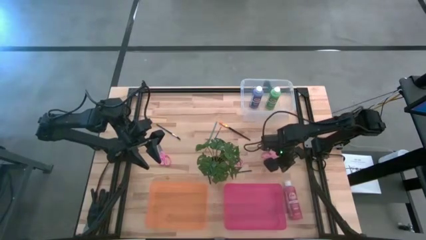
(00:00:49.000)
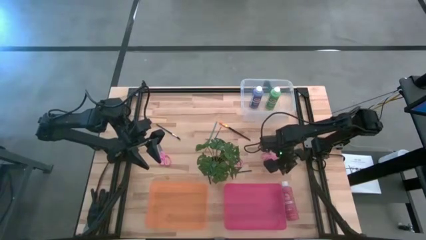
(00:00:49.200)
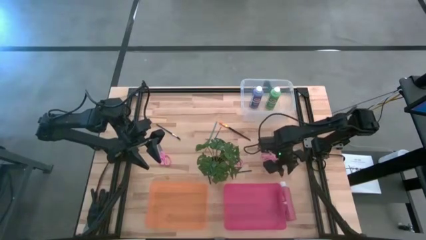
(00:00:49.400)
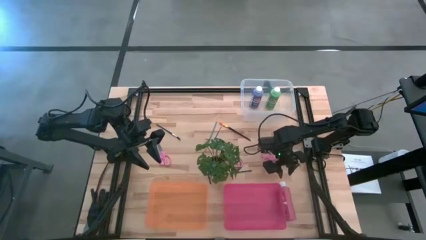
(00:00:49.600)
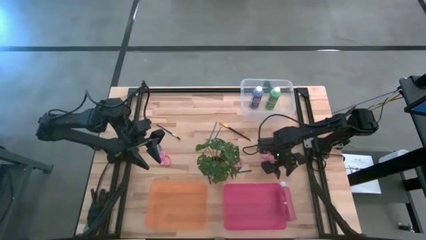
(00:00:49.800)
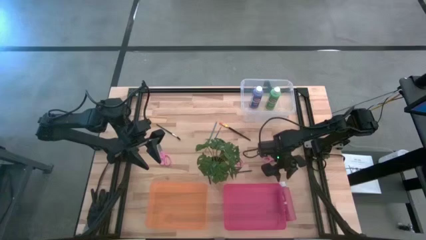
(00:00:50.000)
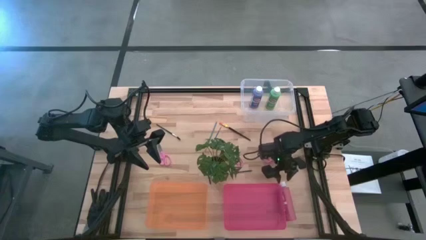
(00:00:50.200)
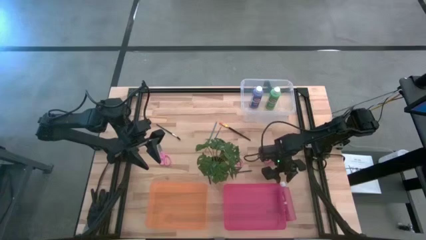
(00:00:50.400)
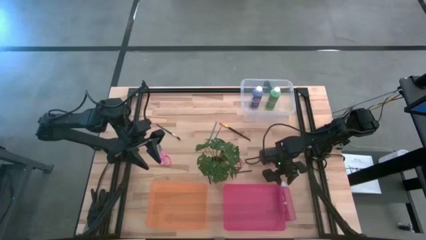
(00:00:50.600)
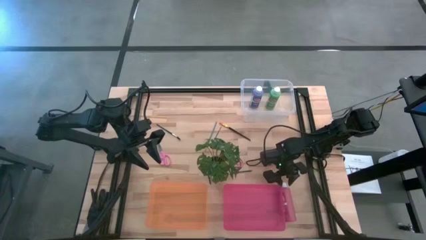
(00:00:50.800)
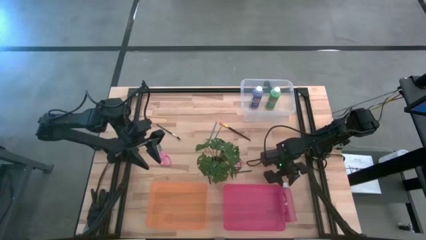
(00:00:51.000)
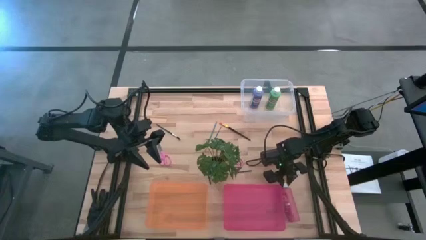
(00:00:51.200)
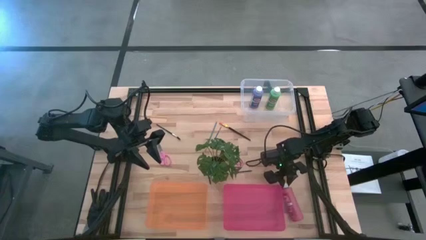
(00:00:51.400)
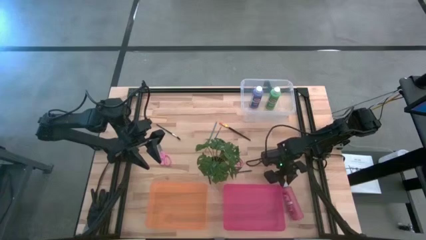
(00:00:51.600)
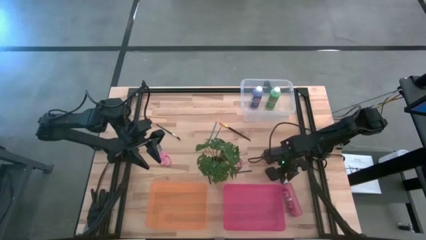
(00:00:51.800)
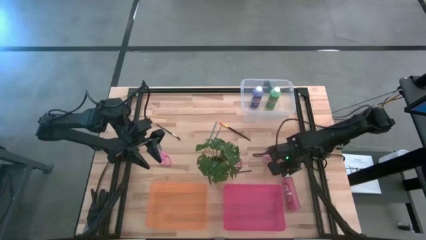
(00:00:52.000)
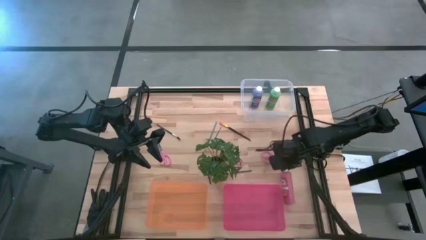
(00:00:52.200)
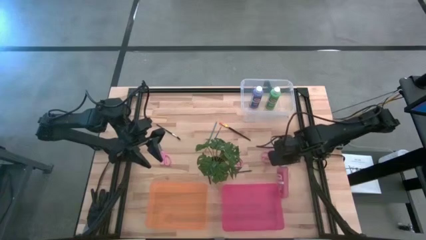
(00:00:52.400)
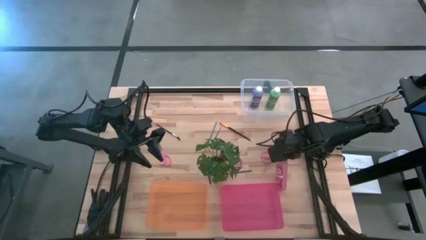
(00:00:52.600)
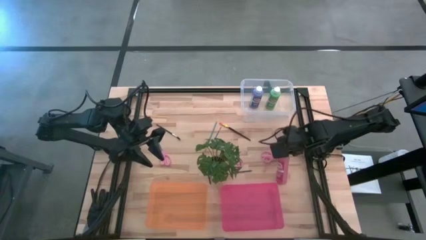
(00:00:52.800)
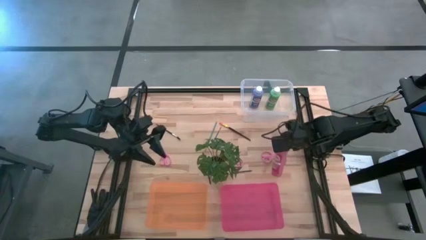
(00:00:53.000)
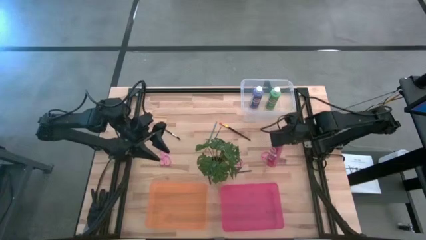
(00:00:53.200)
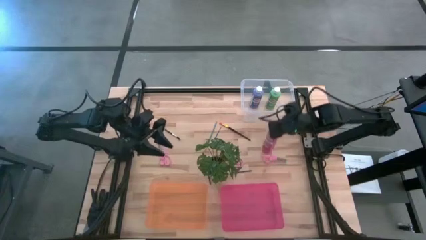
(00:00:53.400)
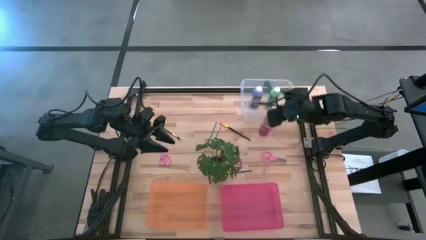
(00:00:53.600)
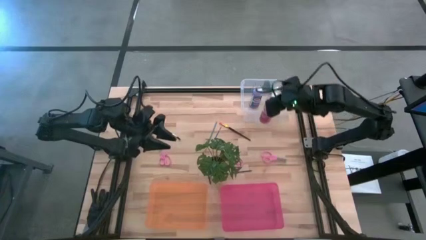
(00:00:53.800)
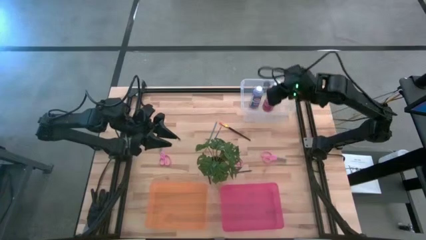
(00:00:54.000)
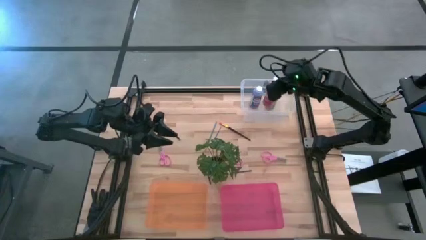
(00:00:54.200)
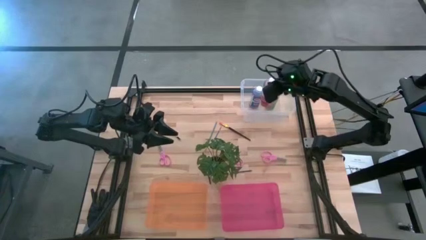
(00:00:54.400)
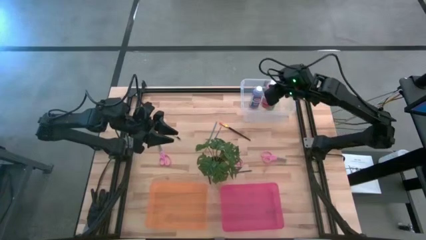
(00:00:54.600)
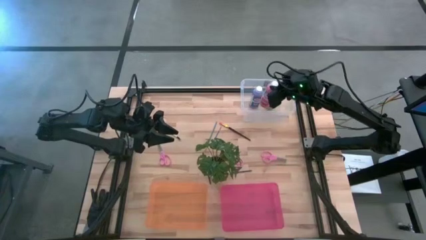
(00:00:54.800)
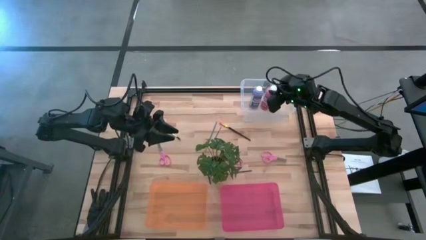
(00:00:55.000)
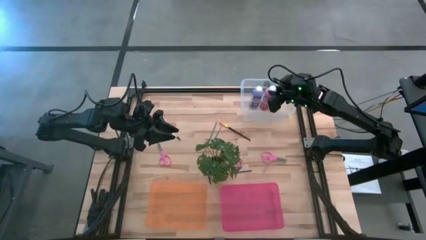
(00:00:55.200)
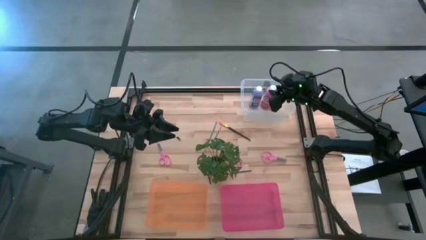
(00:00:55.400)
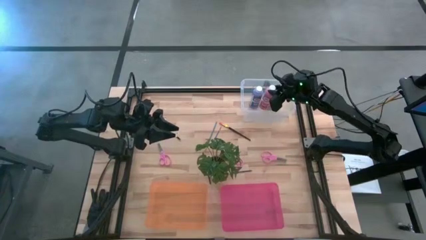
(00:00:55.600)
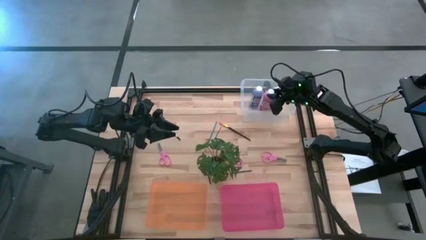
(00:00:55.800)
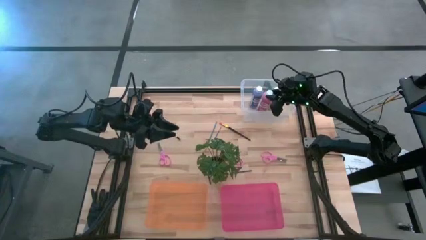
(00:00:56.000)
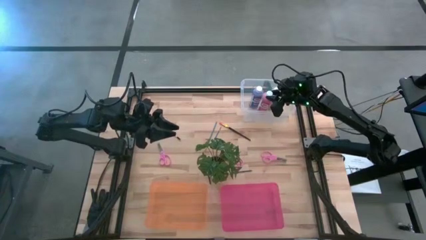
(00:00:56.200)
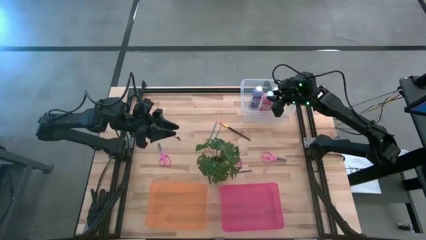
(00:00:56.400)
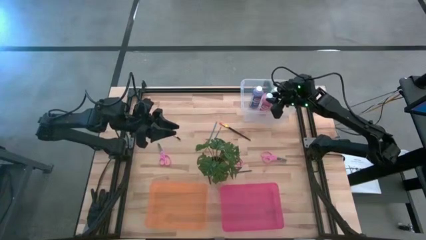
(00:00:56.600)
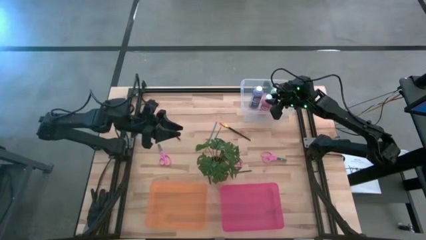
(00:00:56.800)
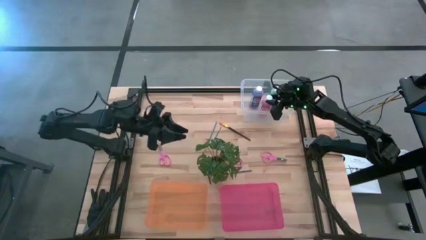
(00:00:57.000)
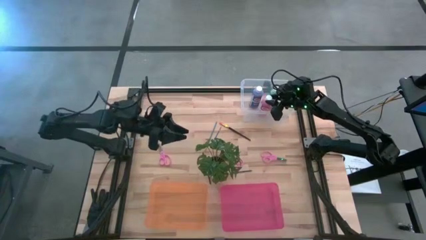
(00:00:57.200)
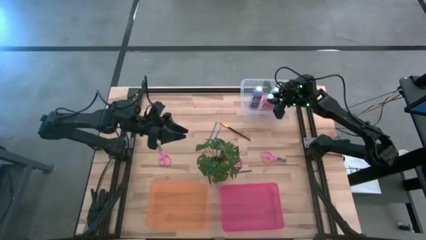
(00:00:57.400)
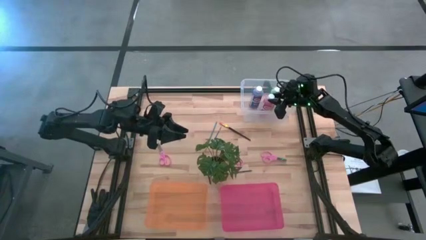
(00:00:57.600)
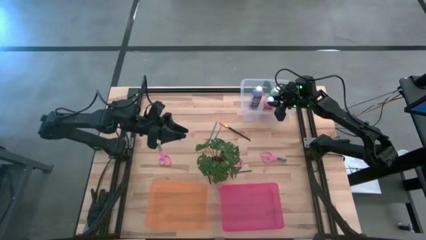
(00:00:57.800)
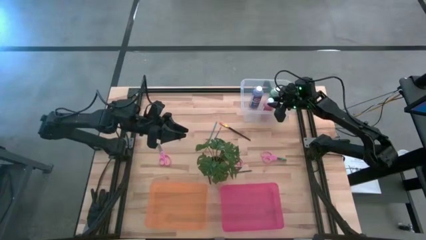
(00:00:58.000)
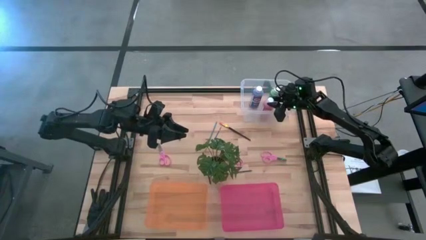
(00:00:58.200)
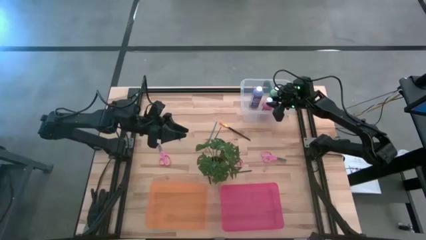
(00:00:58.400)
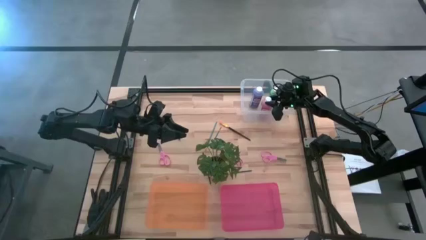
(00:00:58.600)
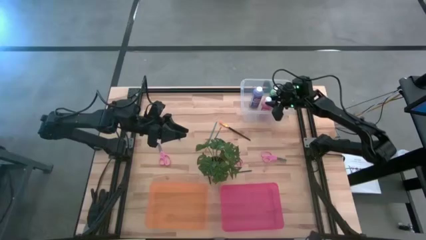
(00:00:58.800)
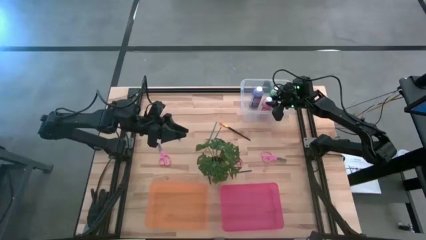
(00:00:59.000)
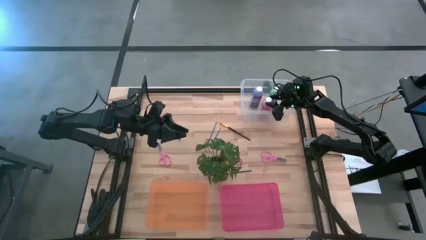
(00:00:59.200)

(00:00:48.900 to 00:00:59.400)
Task: Pick & Place Paint Supplies
Put the pink acrylic craft paint bottle into the transparent bin
